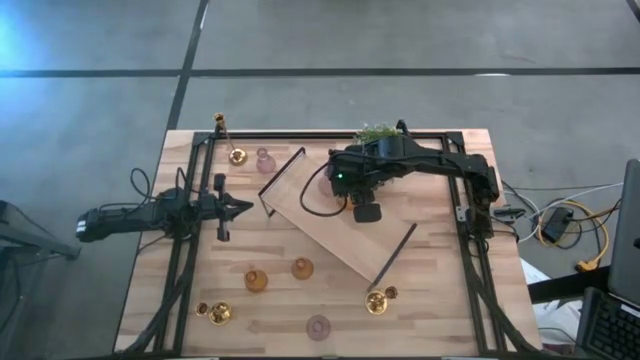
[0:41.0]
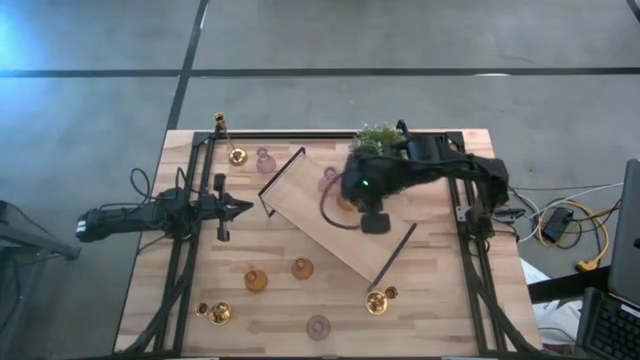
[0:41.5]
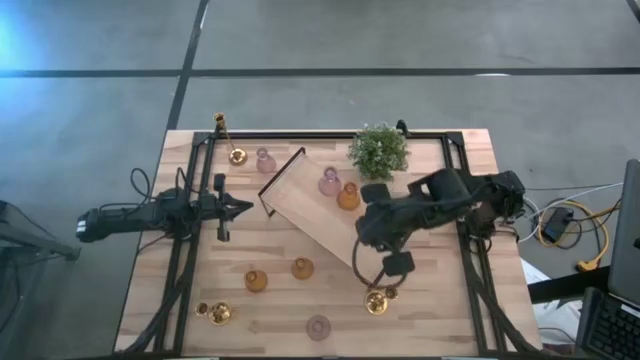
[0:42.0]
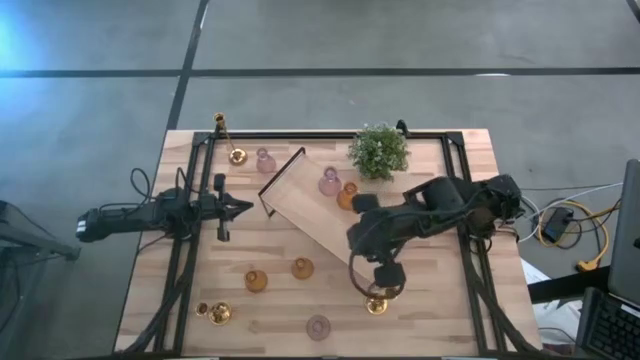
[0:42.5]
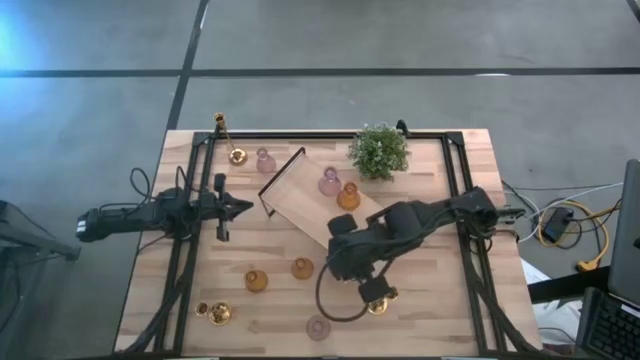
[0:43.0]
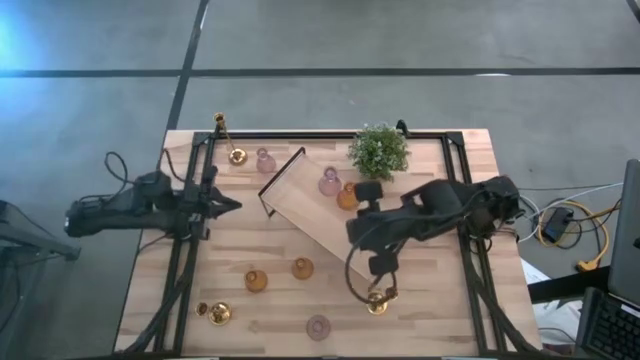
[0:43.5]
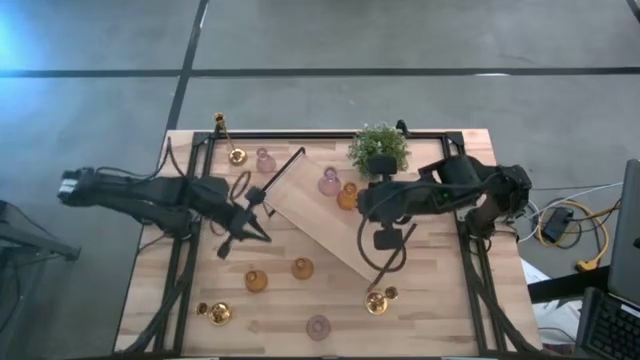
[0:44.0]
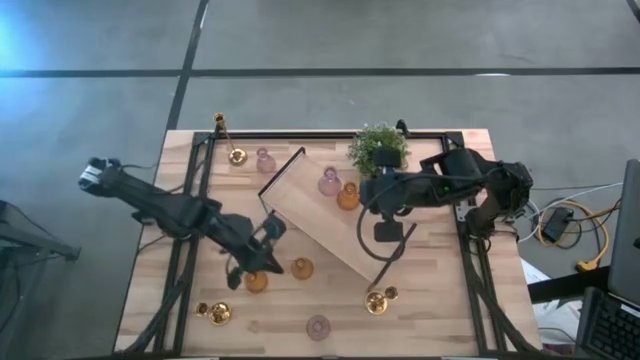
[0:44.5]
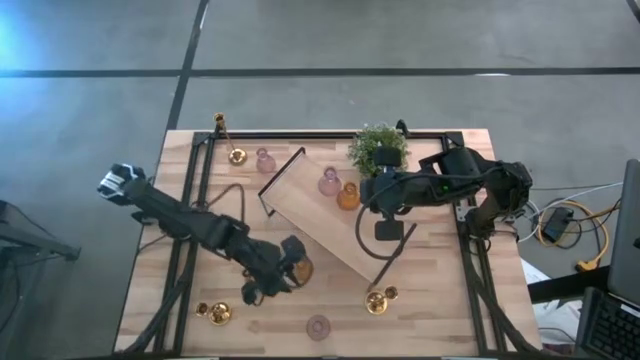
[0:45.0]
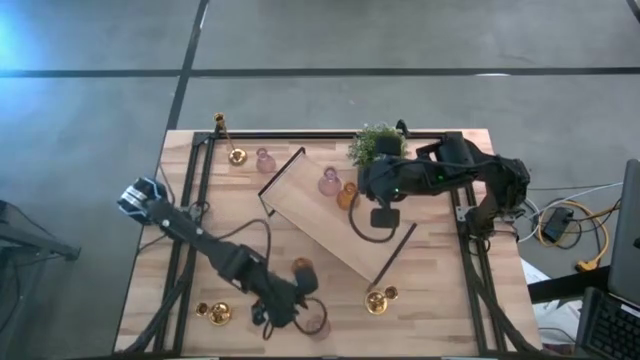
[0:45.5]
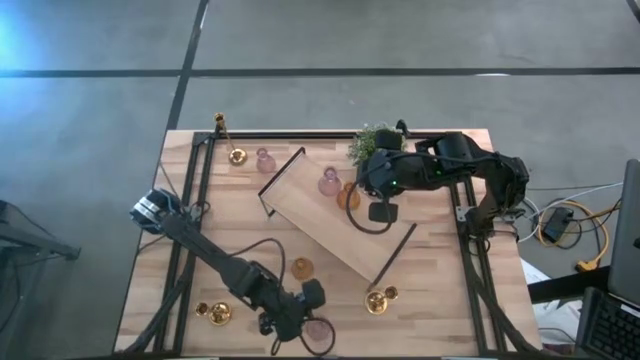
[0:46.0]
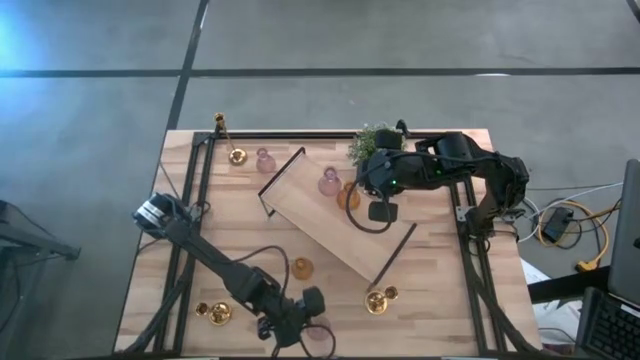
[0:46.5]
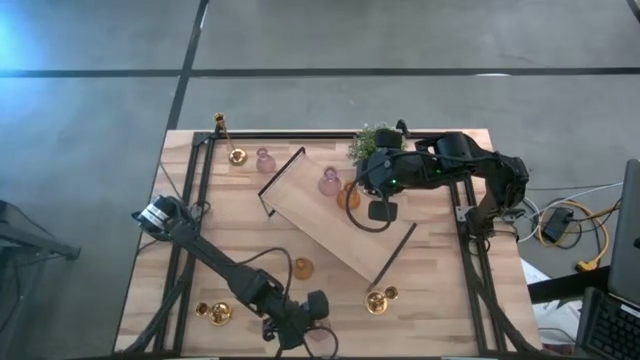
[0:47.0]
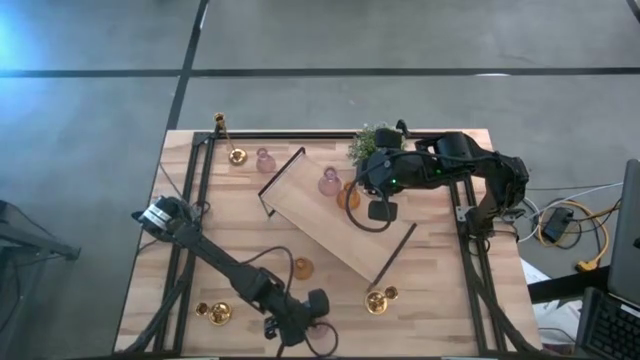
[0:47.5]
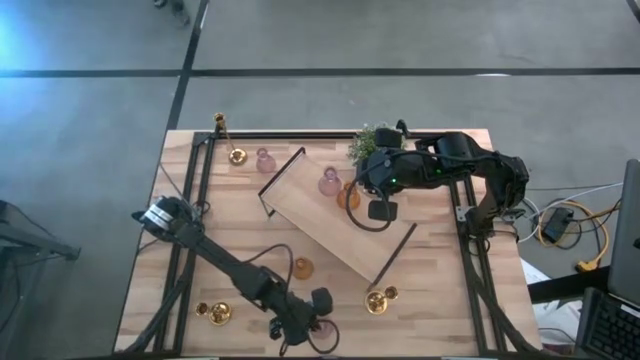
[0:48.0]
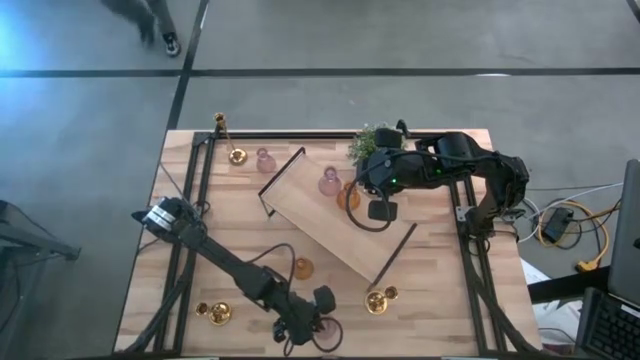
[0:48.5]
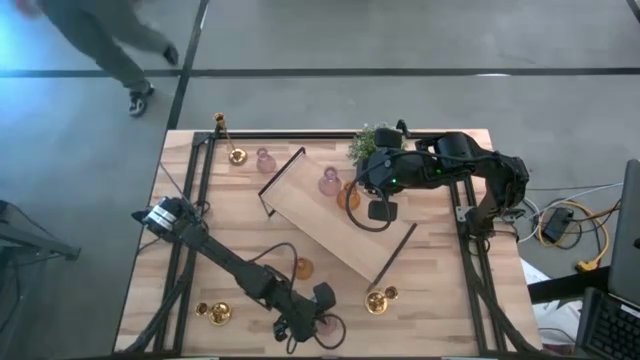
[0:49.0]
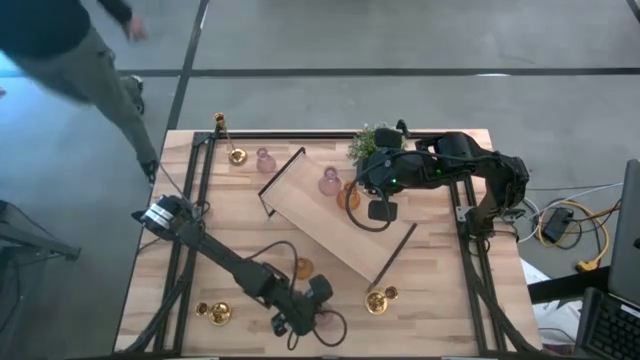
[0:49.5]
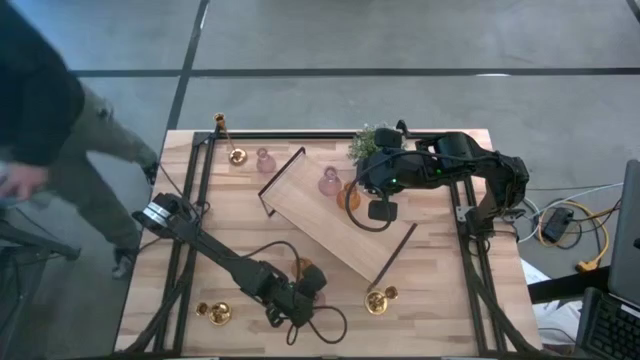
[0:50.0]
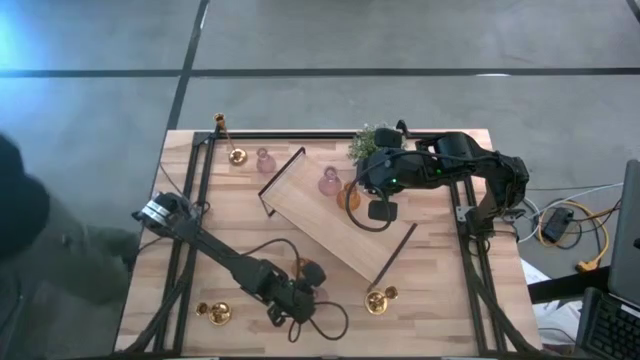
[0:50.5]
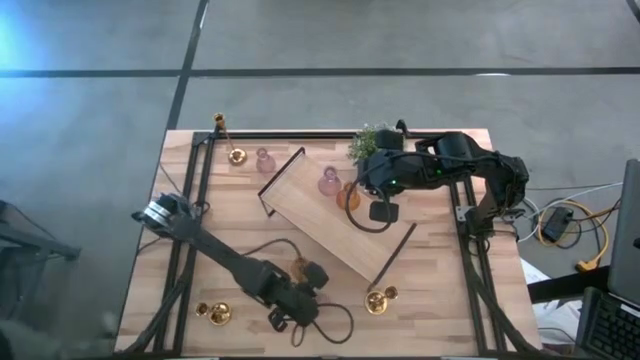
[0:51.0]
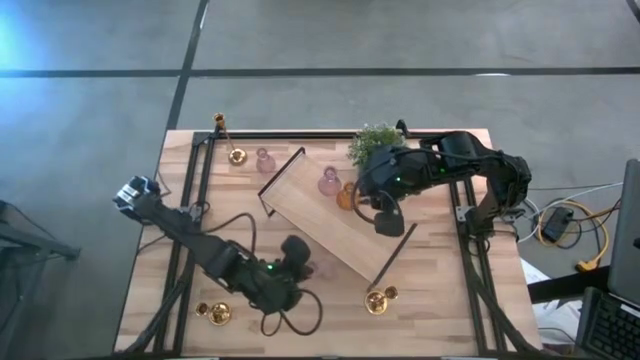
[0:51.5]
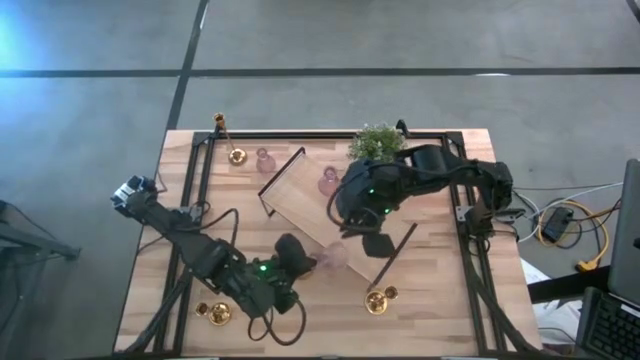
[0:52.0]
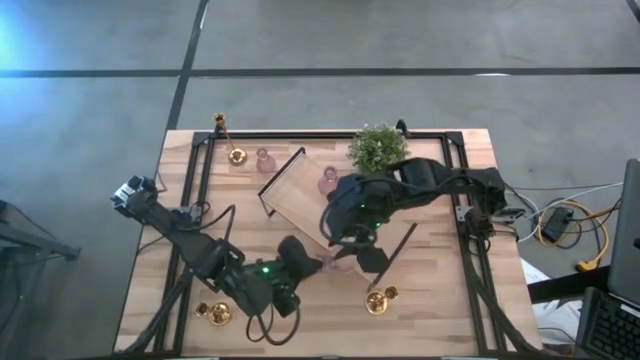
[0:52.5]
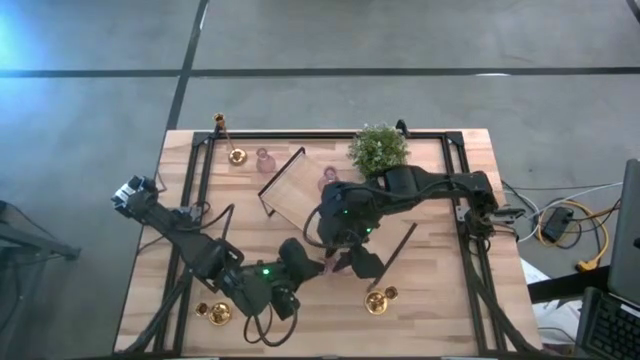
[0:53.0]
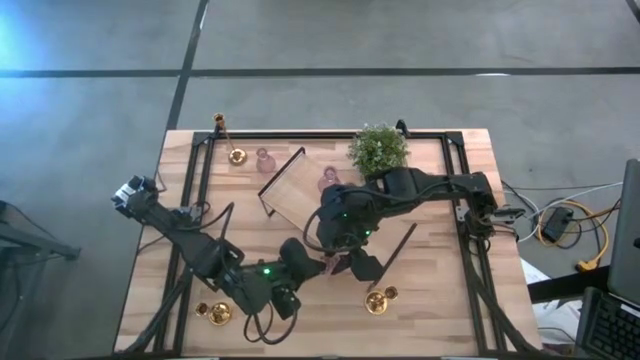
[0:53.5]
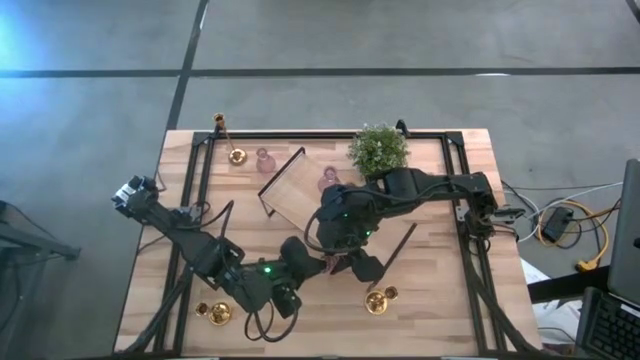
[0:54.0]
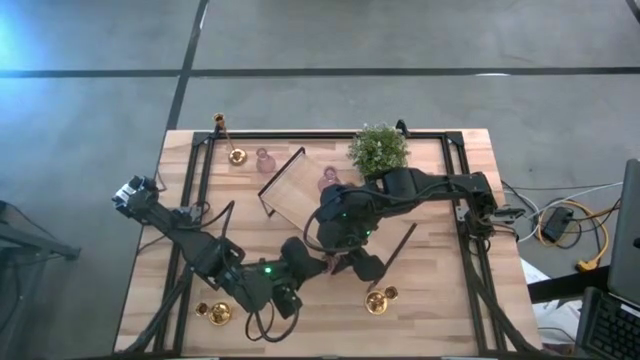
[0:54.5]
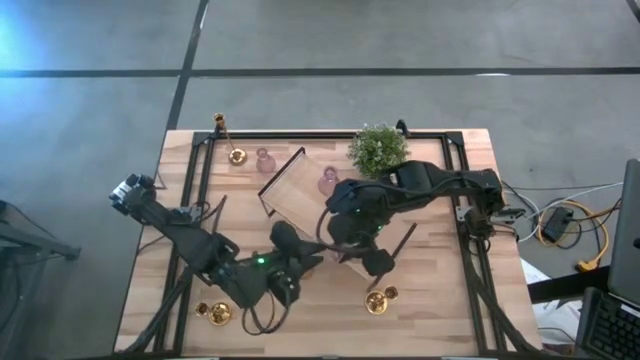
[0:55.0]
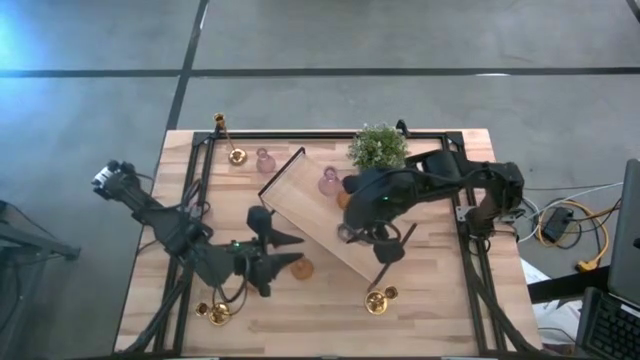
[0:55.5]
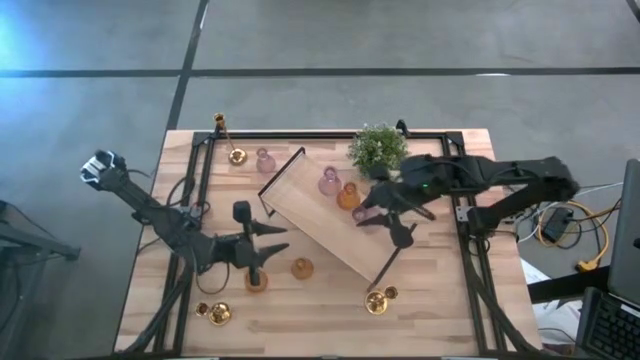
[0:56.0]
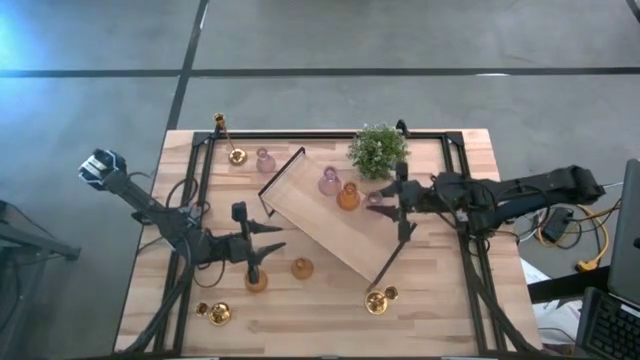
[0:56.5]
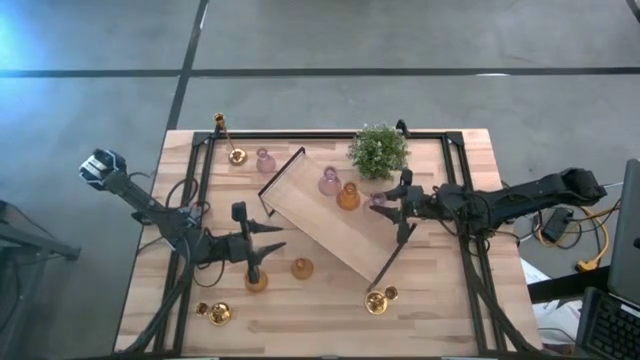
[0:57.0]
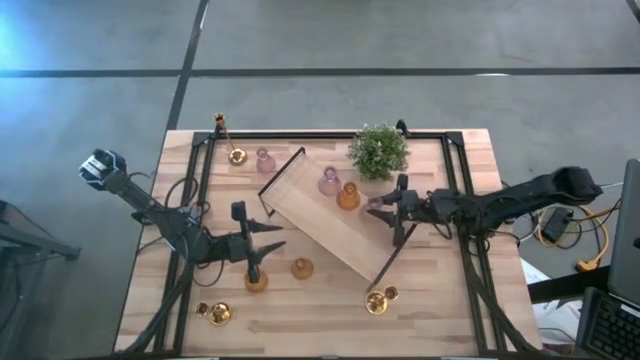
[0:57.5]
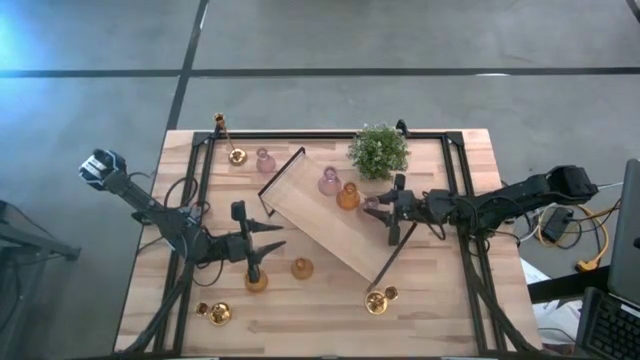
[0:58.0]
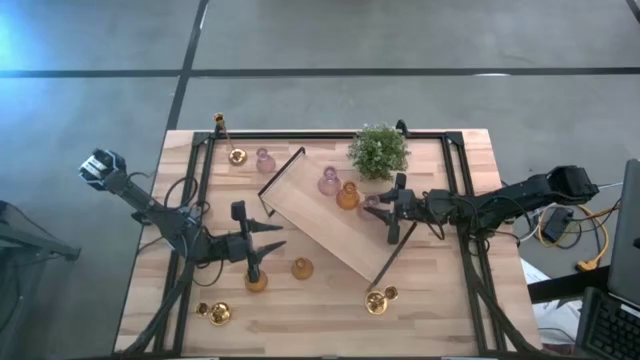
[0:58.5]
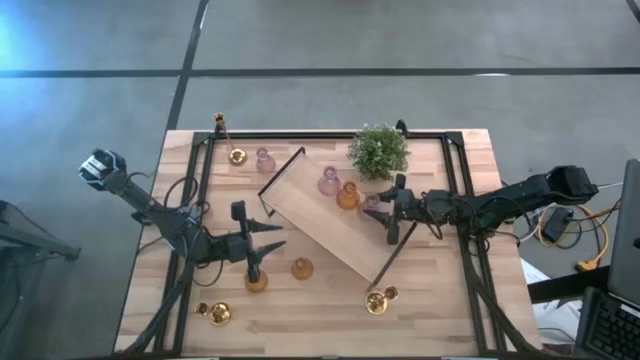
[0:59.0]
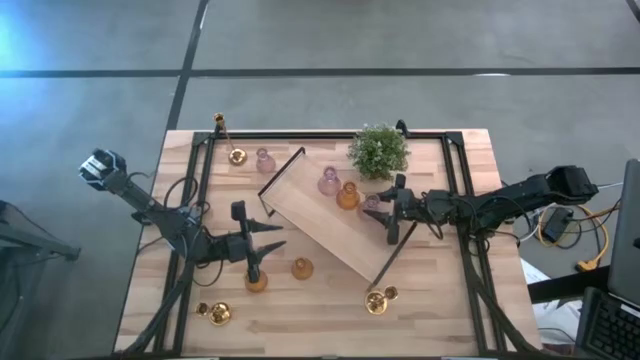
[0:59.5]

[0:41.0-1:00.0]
Task: Pick & Place candle stick holders
Put the light pink glass candle holder on the shelf

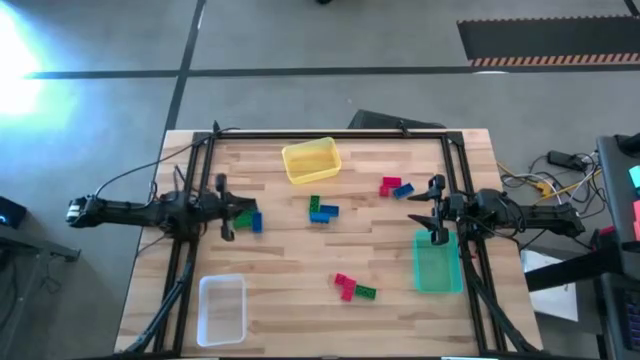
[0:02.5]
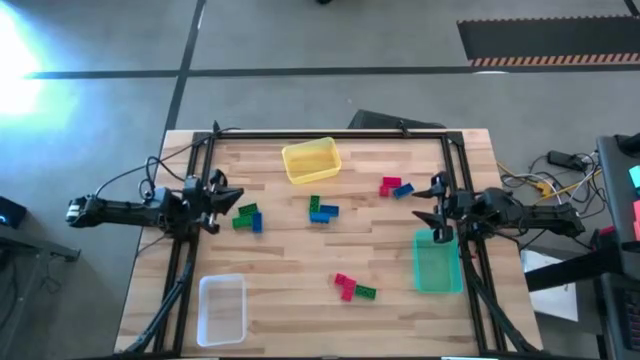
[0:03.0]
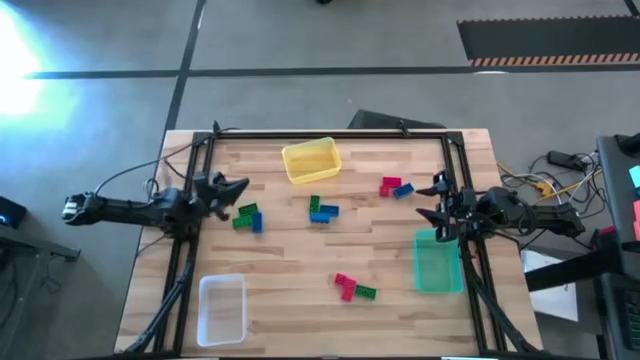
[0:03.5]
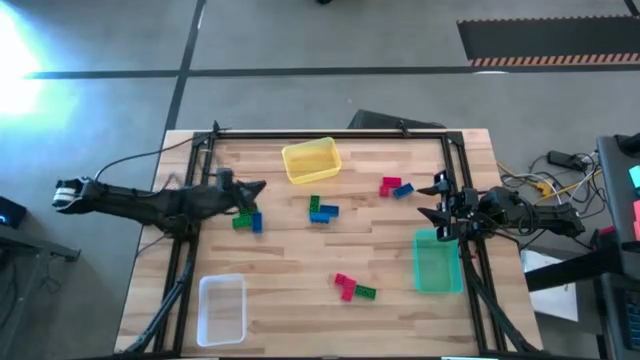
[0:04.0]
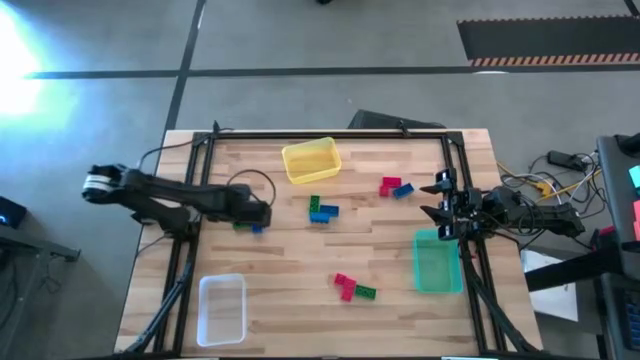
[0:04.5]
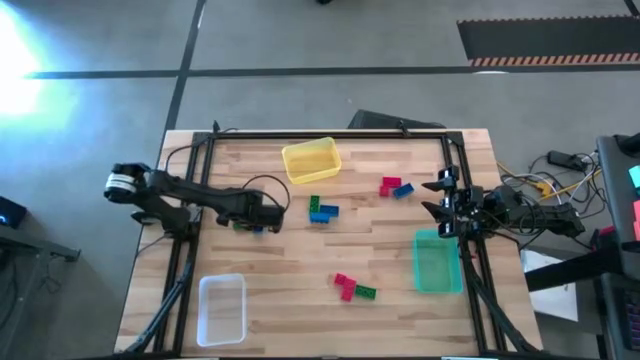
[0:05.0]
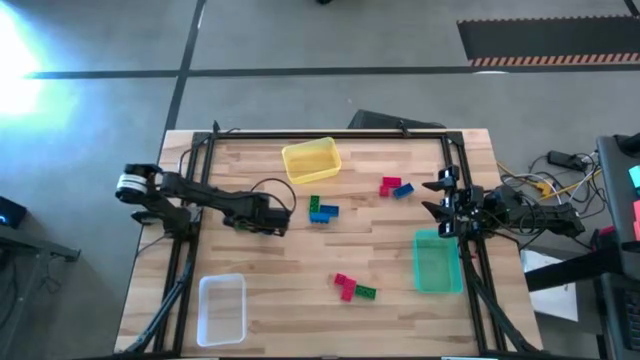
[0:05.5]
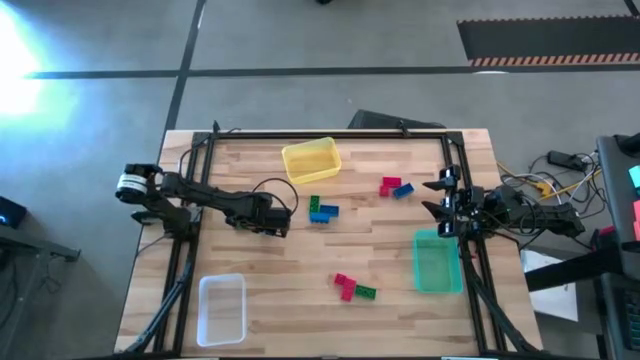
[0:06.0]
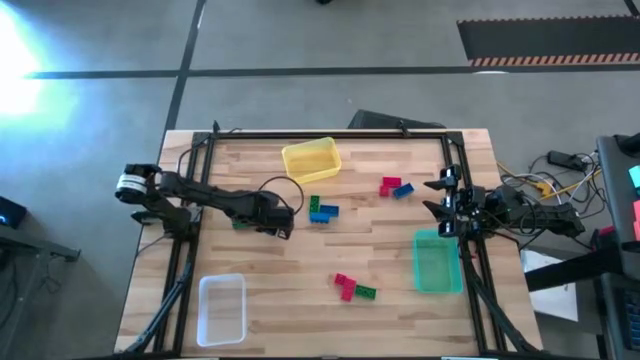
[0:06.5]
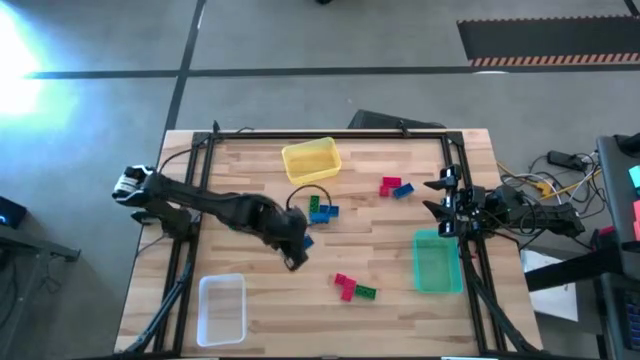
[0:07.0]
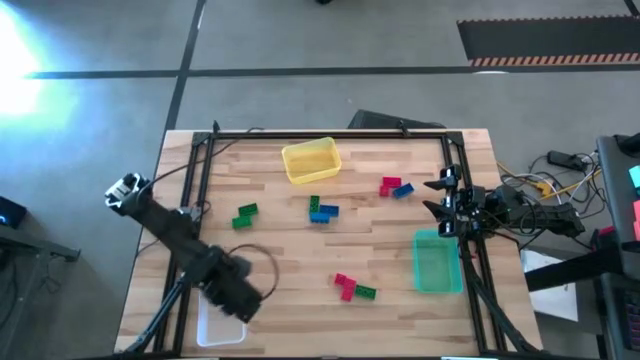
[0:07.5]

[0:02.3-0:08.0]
Task: Sort & place blocks by color
Put the blue game piece into the transparent bin
